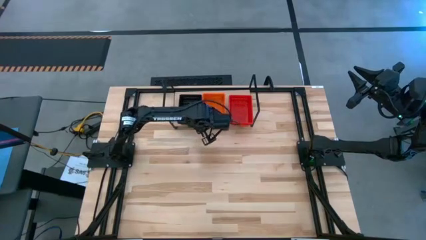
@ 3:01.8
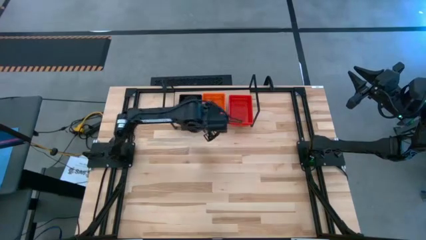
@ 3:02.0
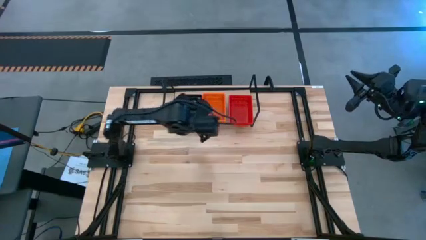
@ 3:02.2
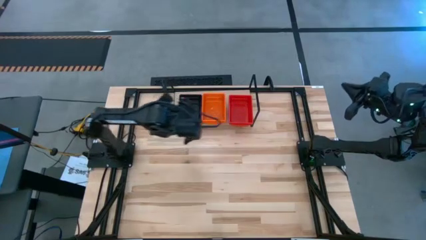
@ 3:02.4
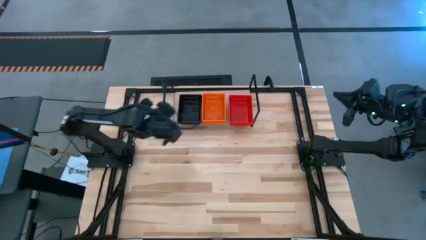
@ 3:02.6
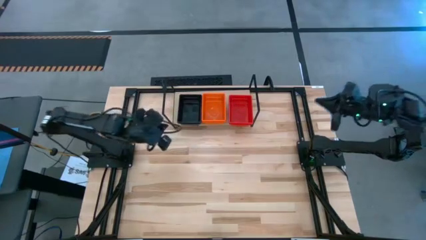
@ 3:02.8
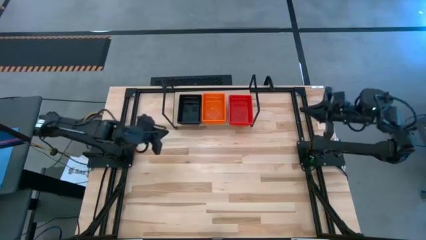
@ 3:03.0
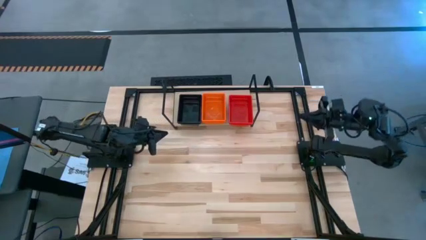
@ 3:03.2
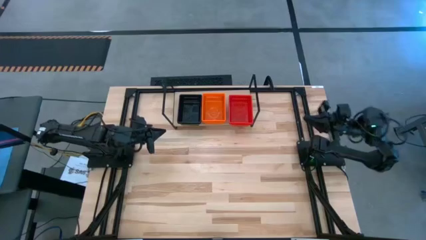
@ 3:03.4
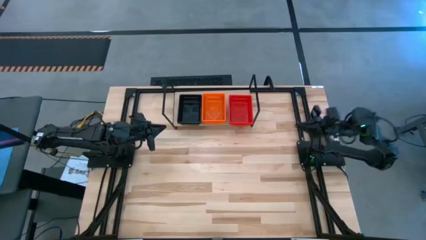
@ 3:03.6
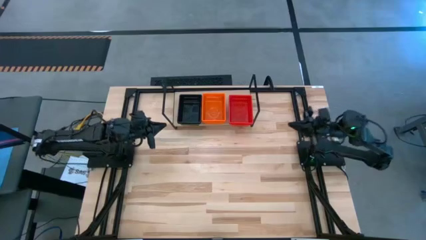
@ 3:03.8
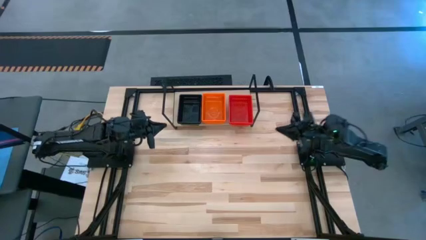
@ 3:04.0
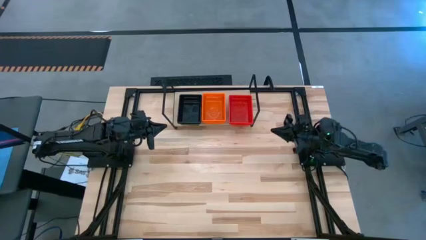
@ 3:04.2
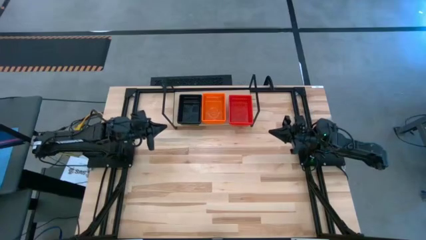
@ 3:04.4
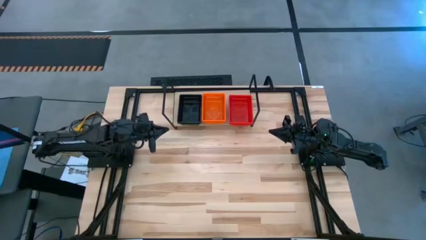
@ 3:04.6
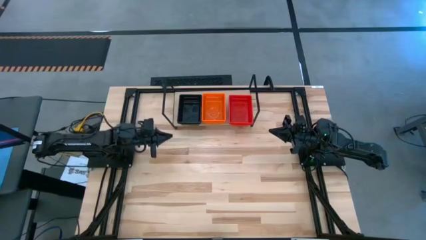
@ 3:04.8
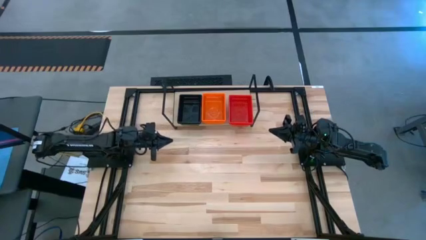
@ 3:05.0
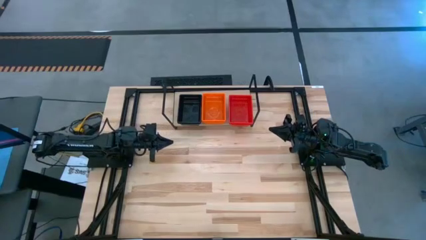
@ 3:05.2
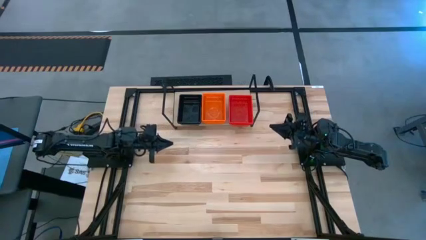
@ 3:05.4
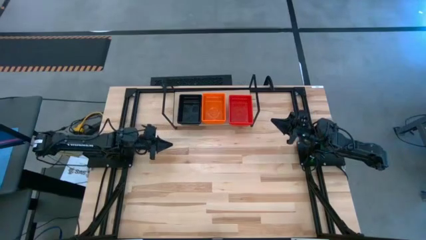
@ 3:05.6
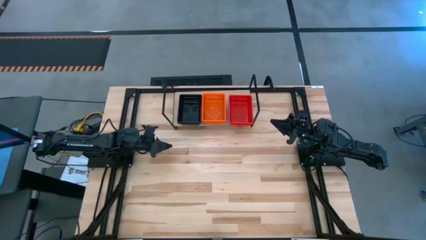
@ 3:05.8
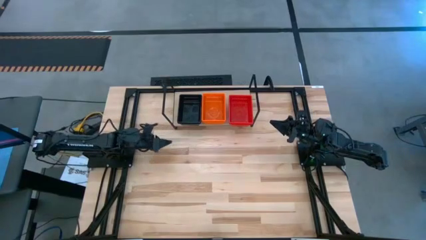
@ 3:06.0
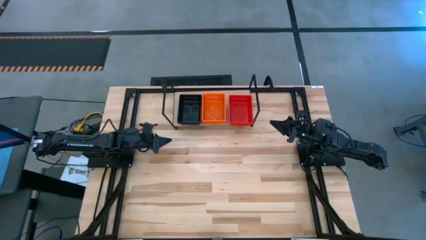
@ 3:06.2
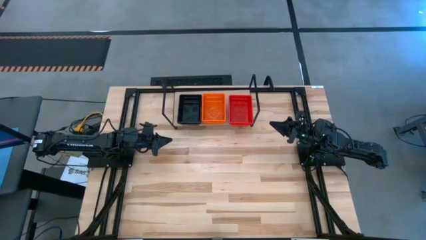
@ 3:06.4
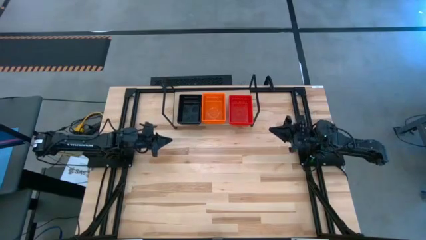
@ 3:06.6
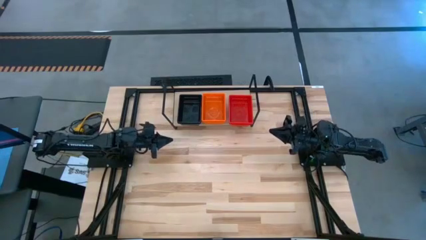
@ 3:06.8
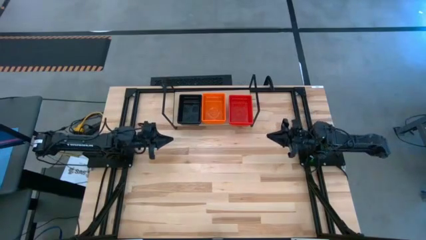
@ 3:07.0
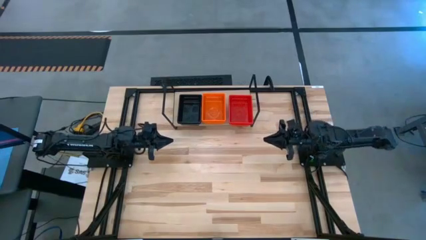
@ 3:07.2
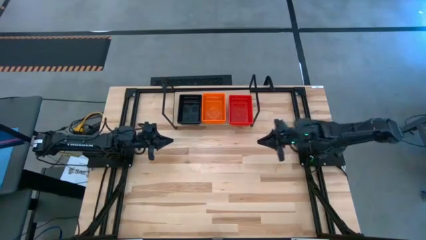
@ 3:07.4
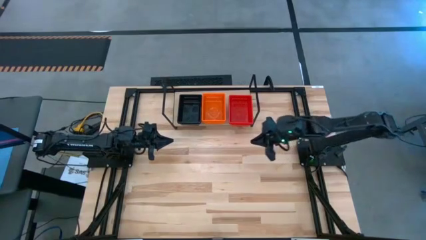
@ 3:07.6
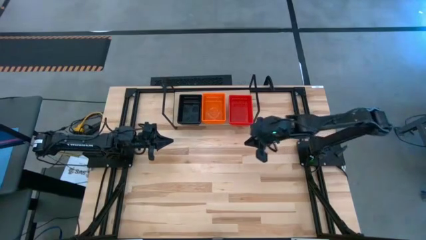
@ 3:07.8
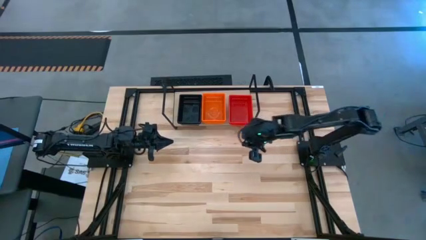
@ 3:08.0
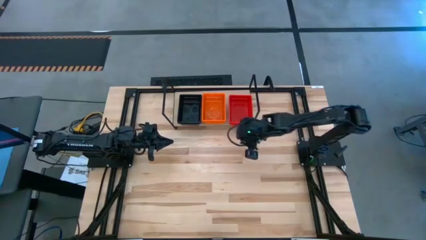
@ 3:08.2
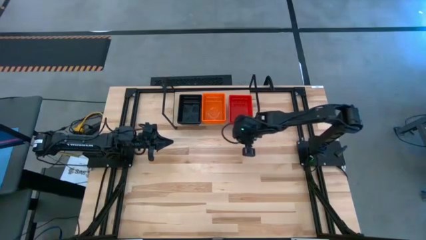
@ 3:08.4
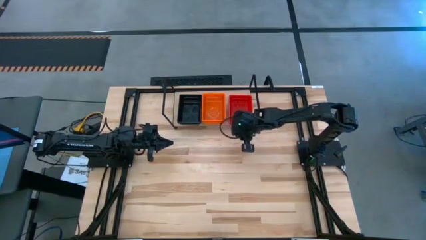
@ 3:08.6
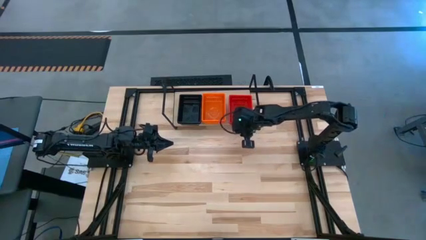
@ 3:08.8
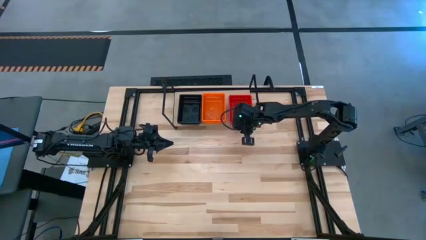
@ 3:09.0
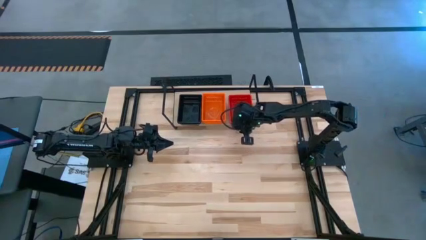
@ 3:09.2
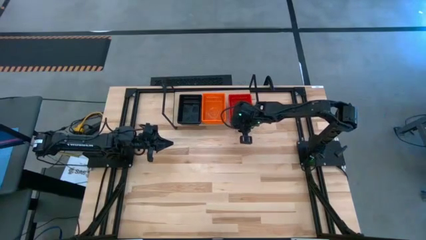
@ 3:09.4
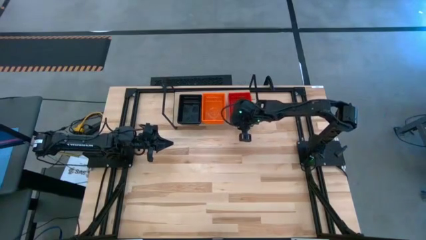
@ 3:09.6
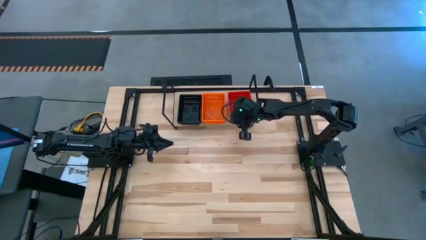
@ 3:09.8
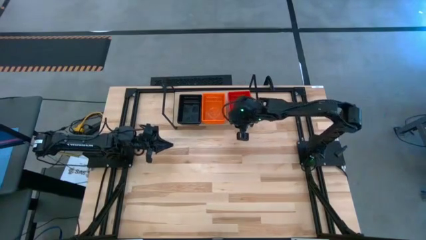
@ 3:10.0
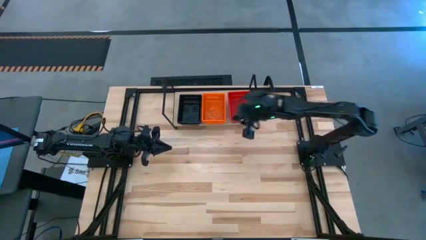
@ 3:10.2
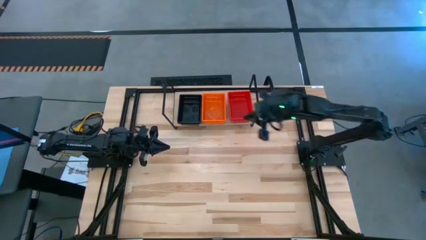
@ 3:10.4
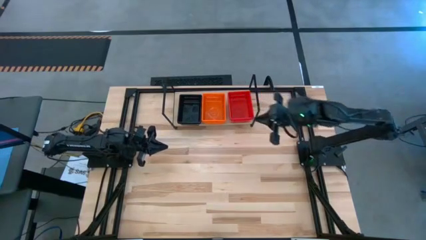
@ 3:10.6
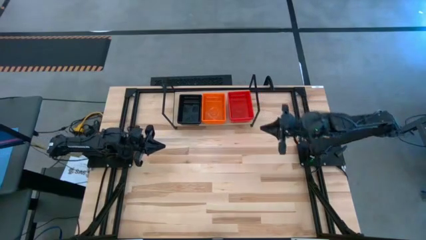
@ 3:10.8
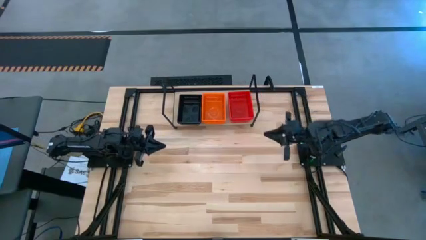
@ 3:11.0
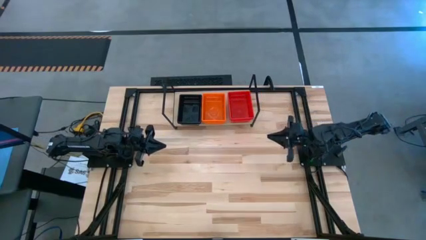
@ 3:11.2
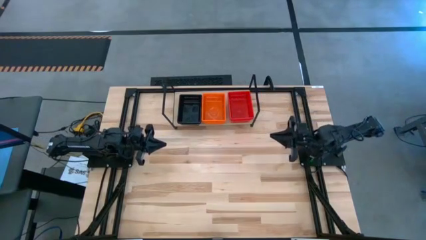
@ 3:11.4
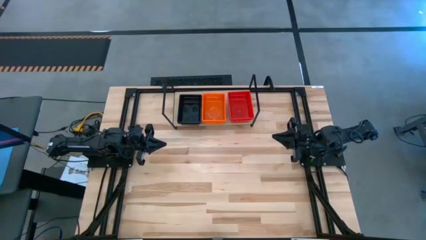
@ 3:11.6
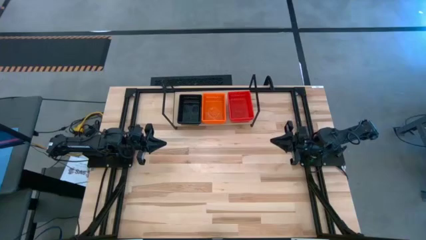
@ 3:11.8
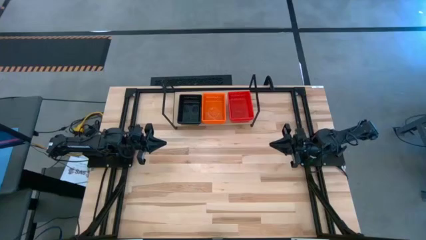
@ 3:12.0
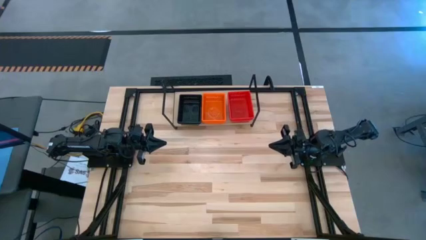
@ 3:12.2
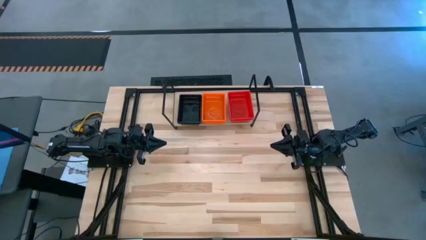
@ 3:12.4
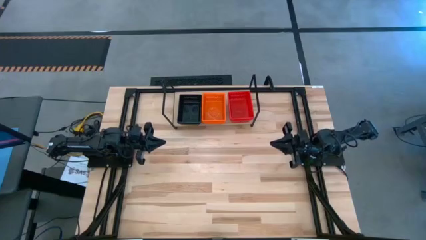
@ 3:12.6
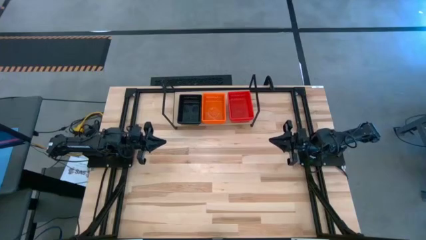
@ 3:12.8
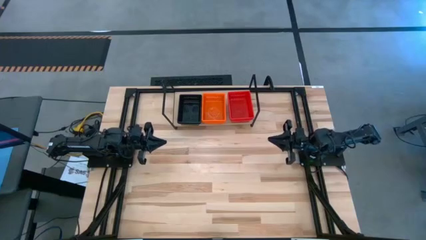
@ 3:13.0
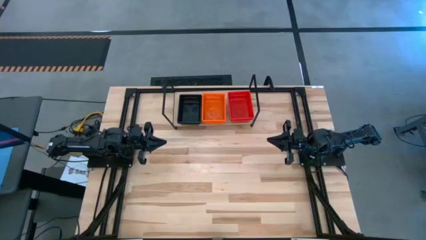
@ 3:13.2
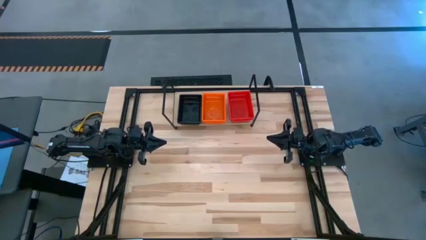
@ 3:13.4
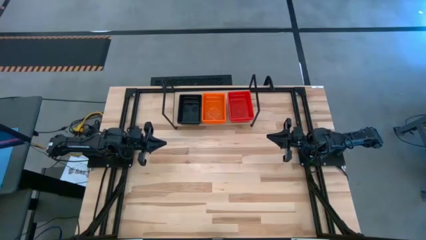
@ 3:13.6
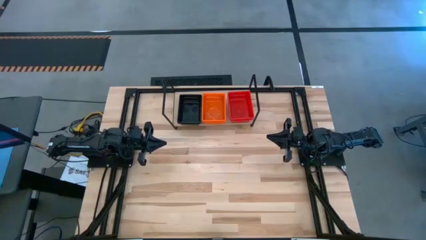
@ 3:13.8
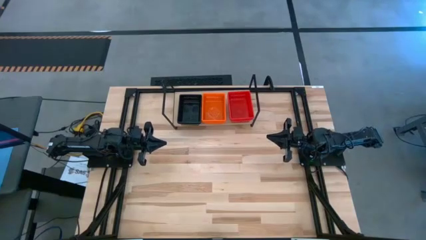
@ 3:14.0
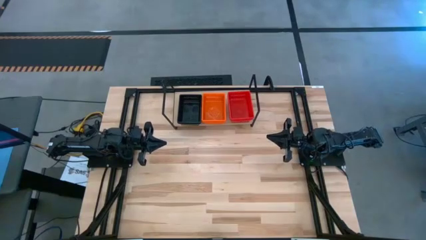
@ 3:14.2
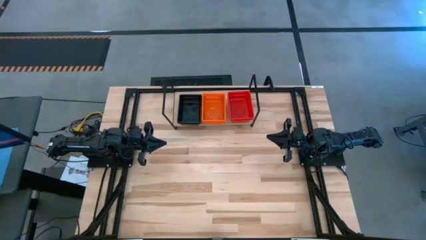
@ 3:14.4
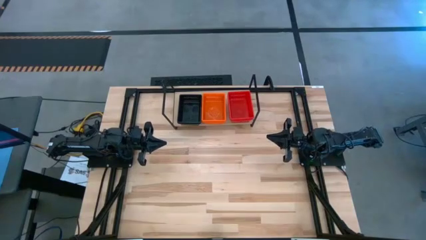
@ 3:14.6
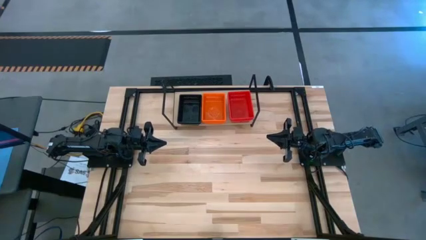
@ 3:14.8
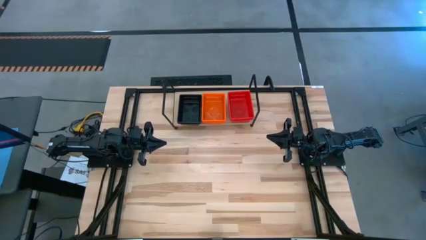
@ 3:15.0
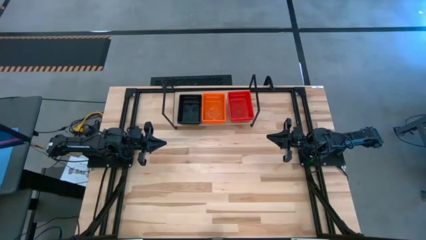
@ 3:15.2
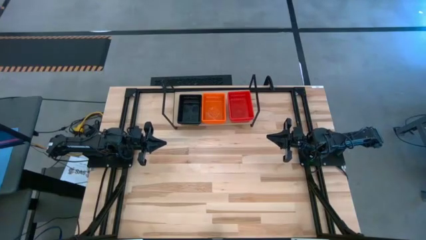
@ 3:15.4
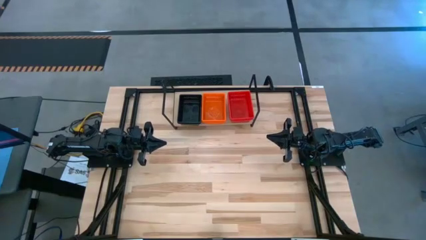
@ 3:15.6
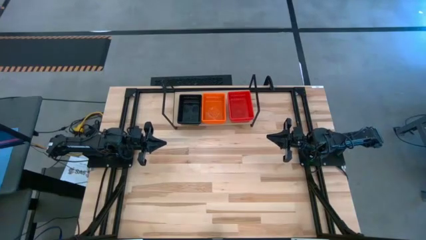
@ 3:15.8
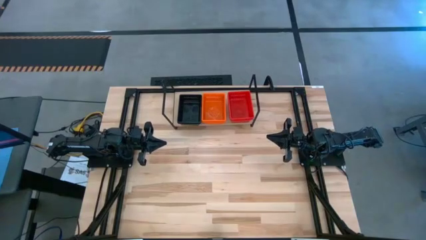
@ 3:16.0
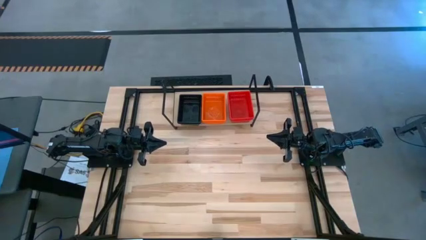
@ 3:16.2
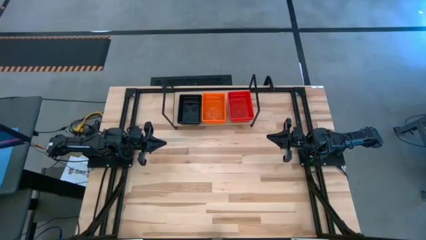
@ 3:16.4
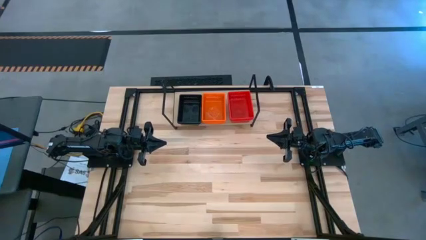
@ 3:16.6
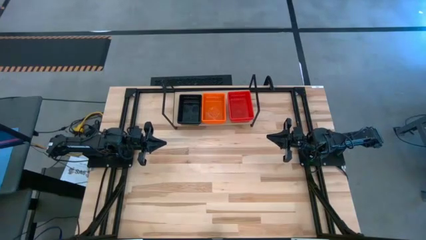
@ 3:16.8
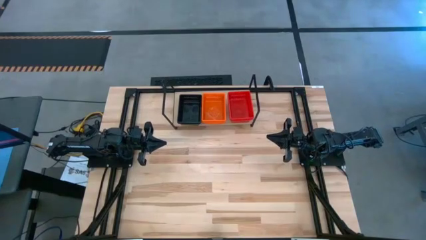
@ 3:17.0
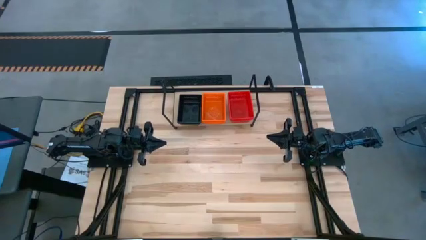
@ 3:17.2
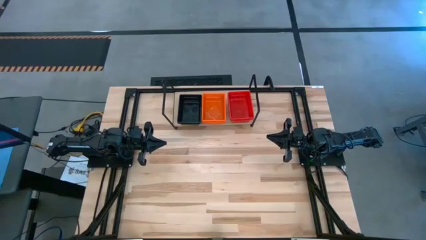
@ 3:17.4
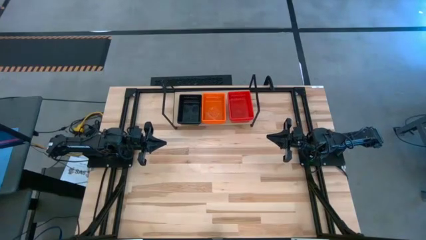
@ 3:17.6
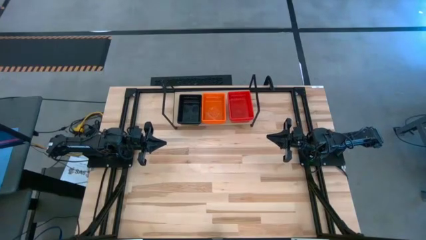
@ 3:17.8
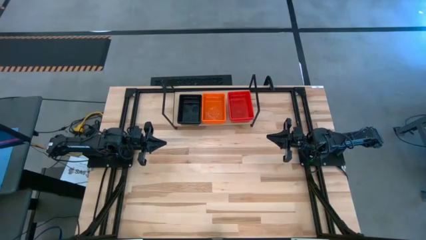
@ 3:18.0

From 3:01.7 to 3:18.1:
Task: Stack baskets on shelf by color
Return to Home Position
